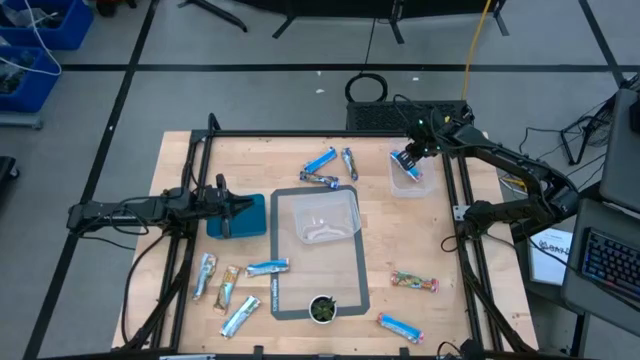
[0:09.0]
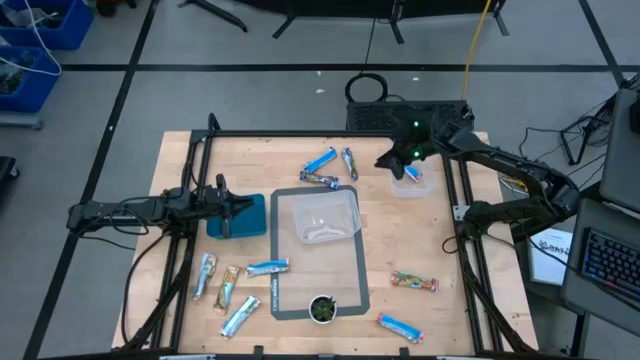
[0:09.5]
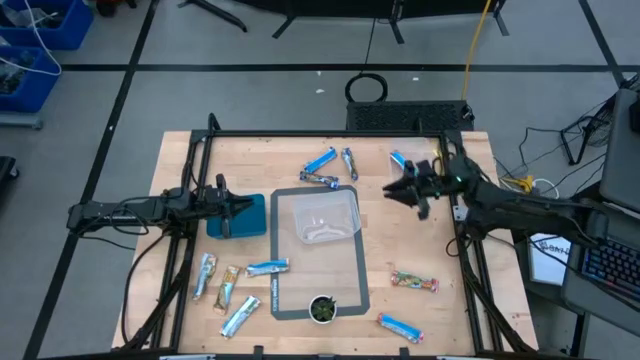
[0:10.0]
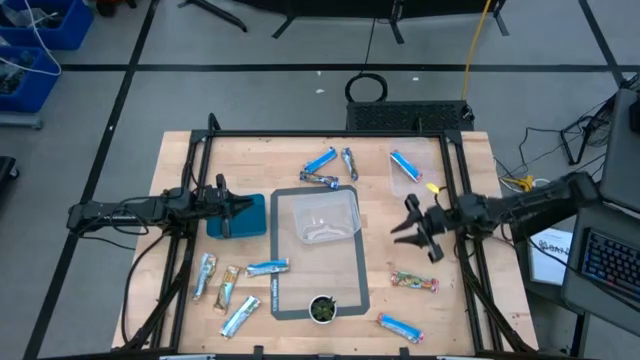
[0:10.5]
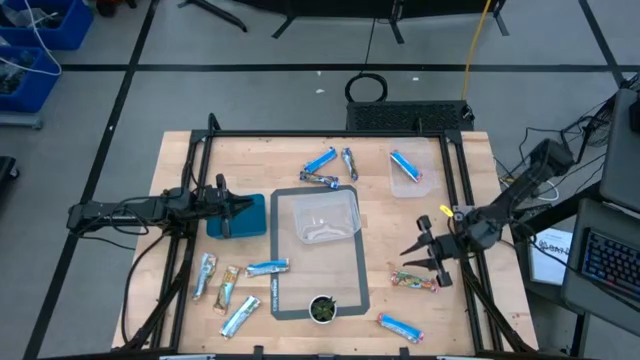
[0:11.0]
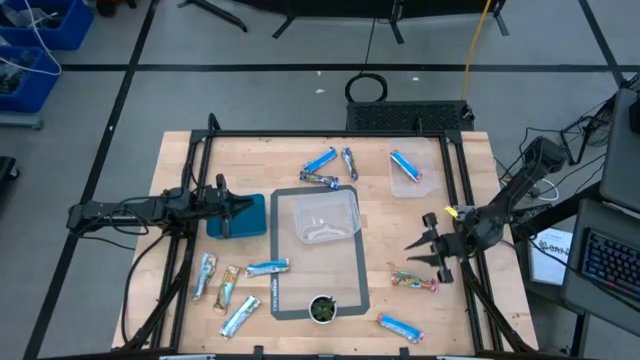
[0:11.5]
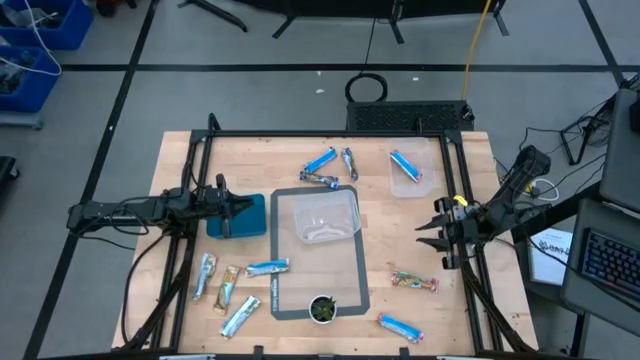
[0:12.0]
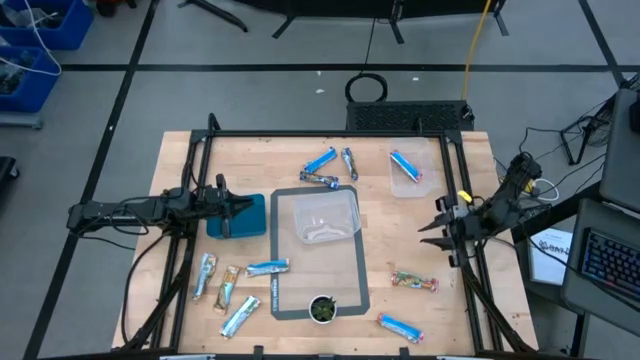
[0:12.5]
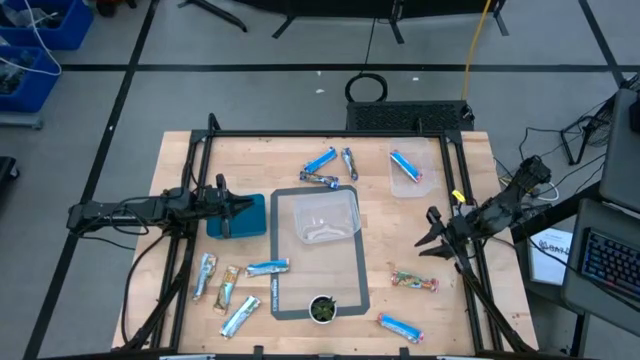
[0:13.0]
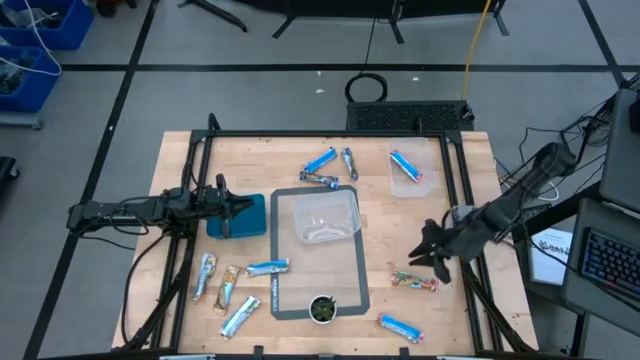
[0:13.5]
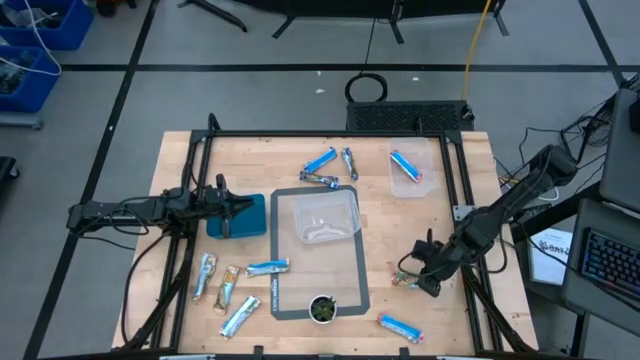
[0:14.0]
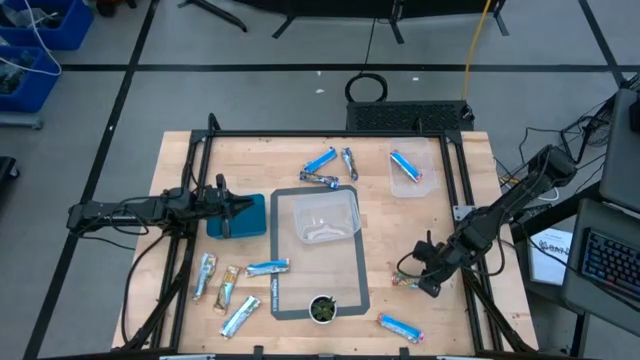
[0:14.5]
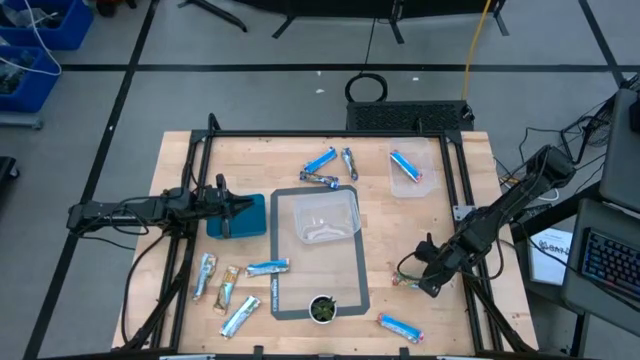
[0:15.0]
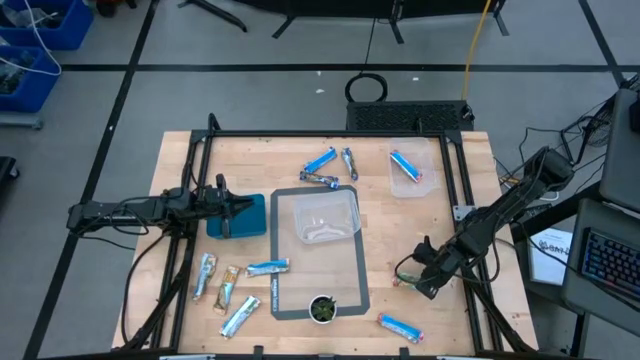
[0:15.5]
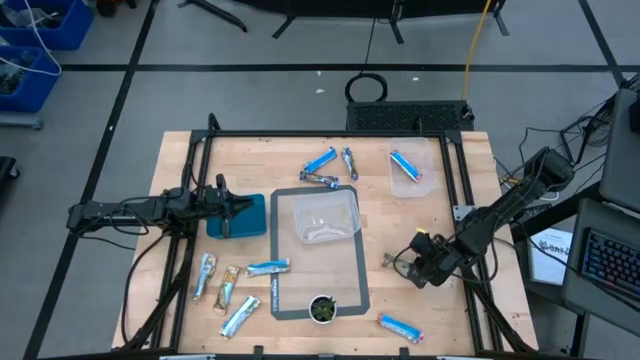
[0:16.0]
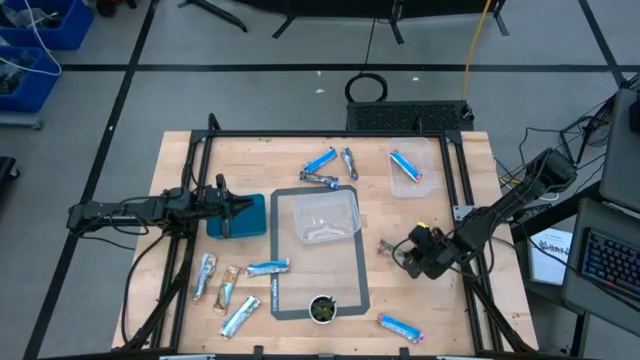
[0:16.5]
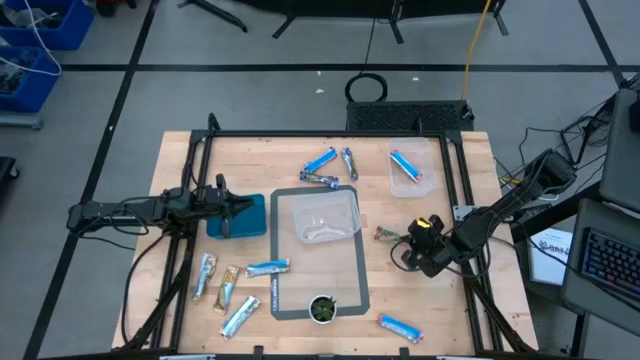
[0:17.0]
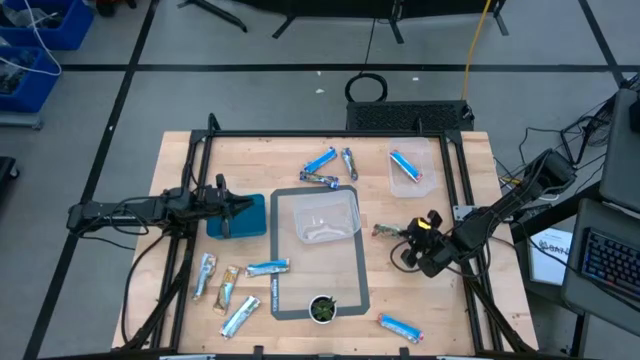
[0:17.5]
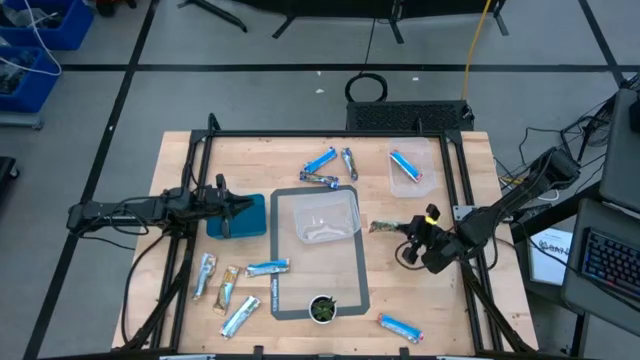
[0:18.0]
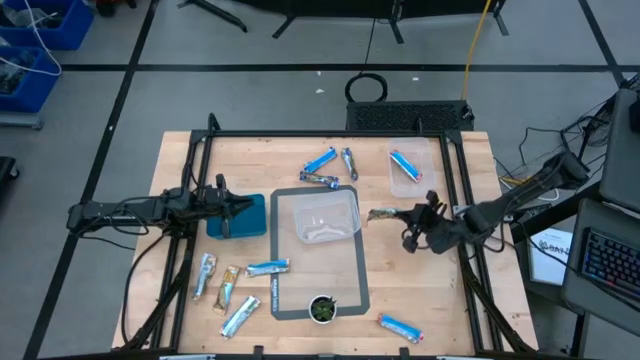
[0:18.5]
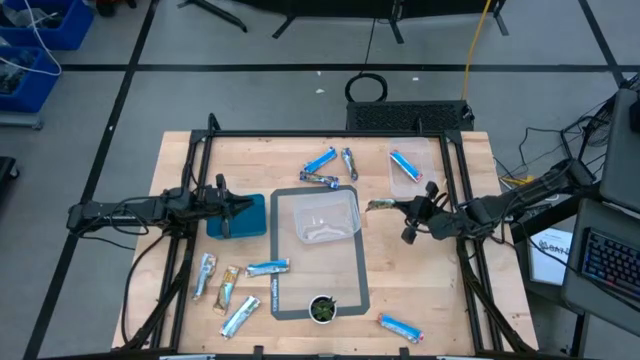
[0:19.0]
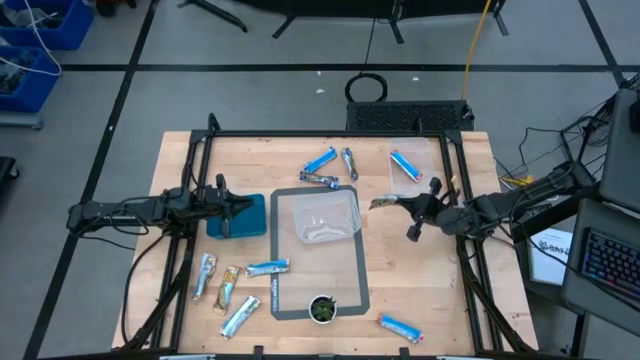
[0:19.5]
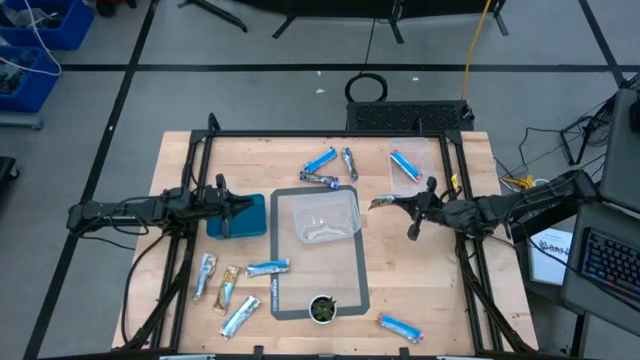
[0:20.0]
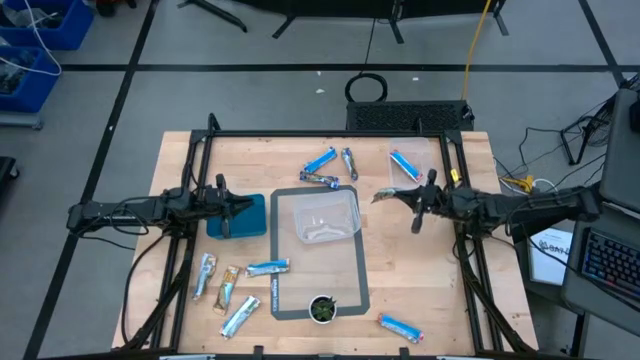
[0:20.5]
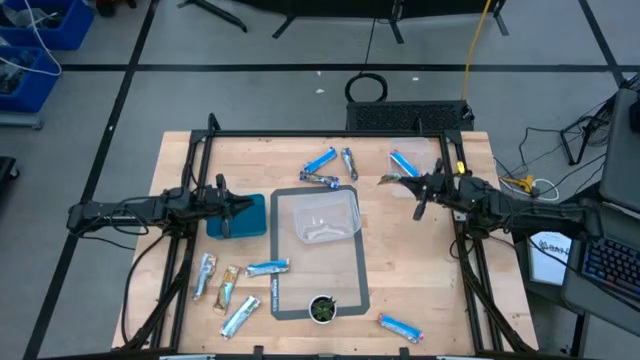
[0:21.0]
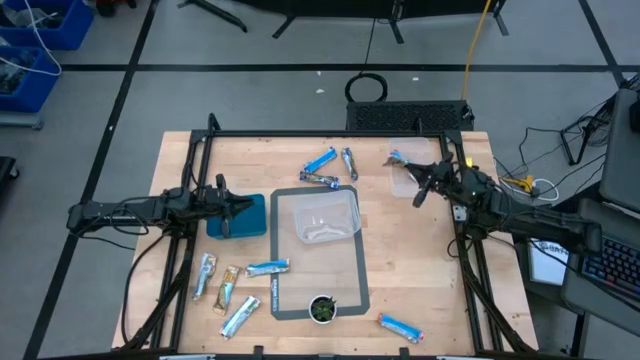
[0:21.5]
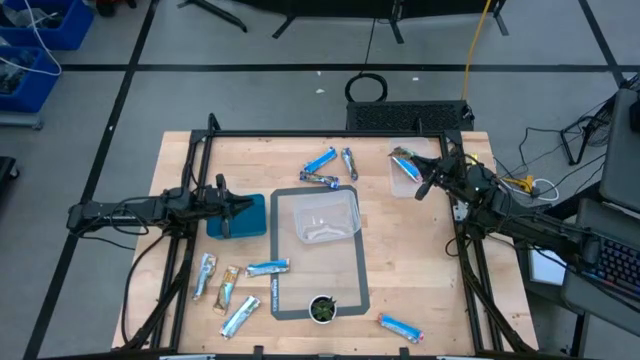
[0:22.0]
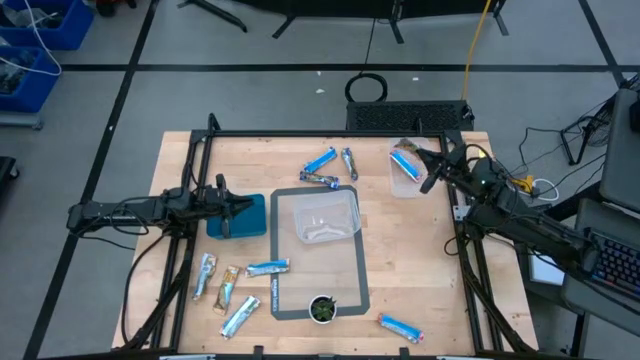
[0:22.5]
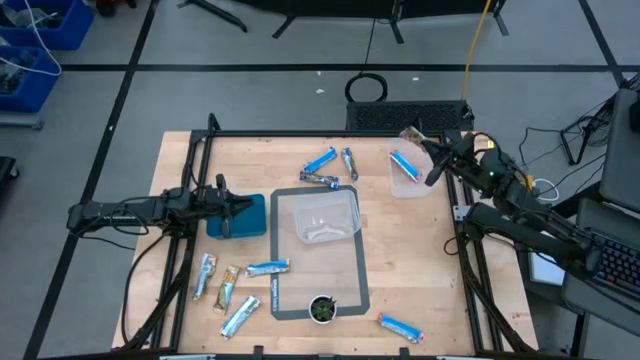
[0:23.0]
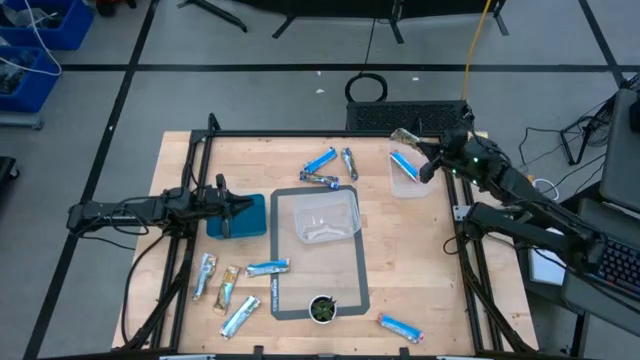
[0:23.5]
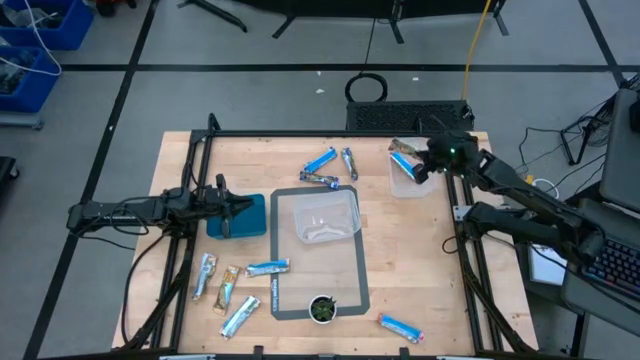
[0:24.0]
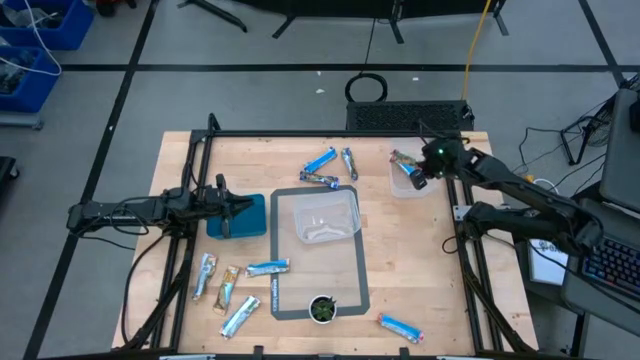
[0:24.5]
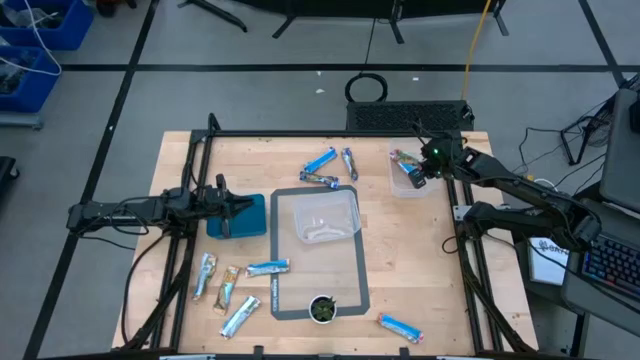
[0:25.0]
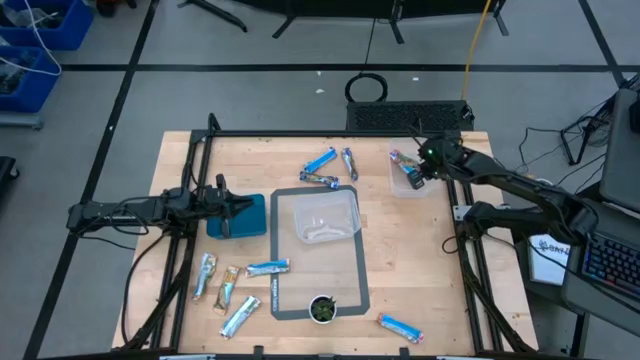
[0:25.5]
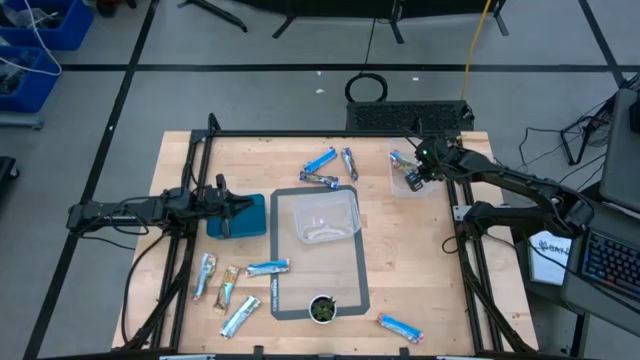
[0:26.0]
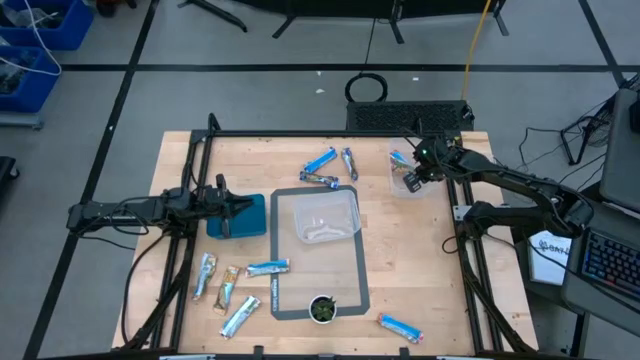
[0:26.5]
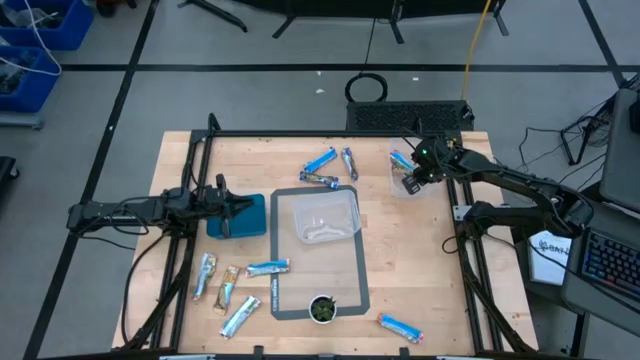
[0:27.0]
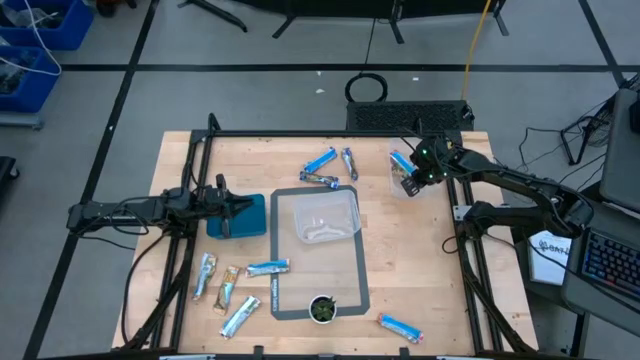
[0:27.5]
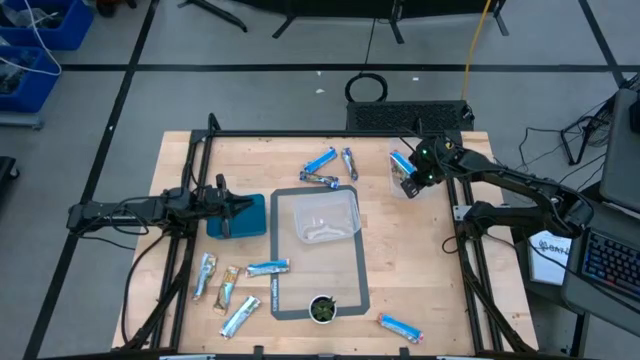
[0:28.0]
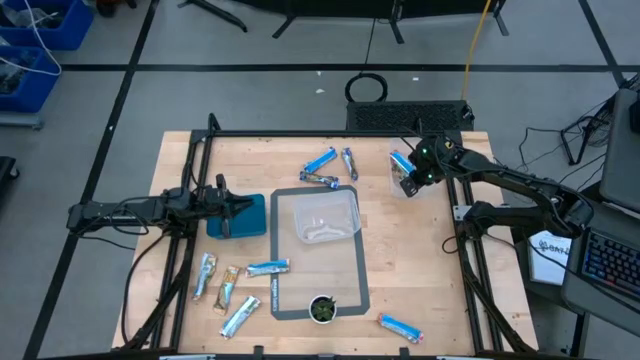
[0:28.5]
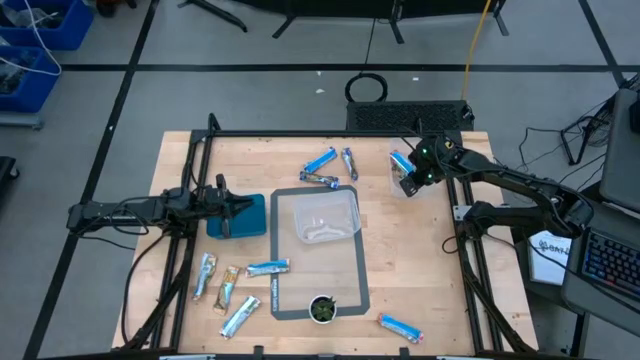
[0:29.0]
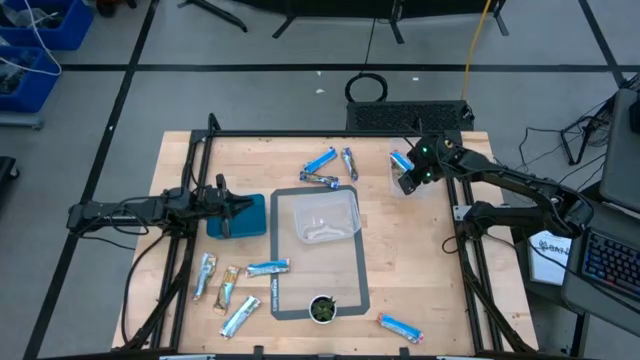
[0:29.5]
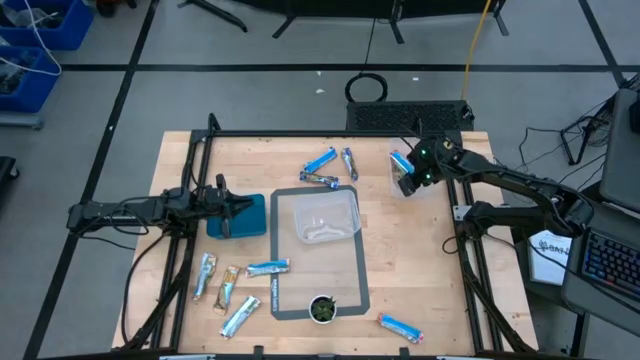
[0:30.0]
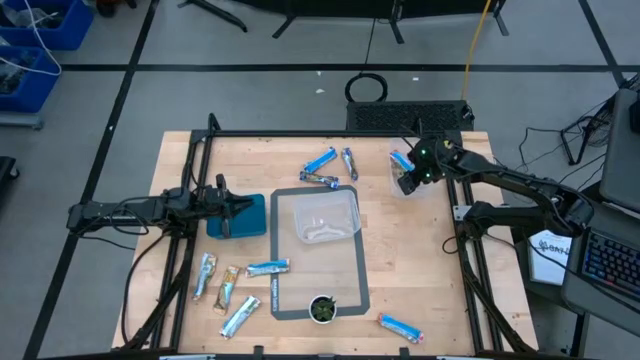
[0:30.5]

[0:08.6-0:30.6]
Task: Pick and place Granola Bars by type
Put the red granola bar into the right transparent bin
